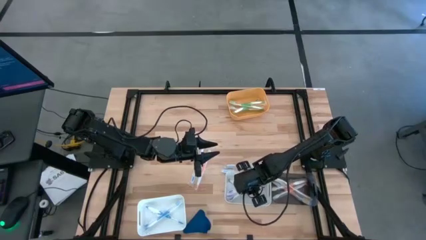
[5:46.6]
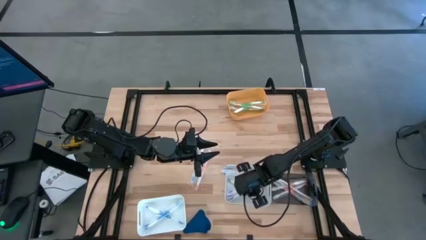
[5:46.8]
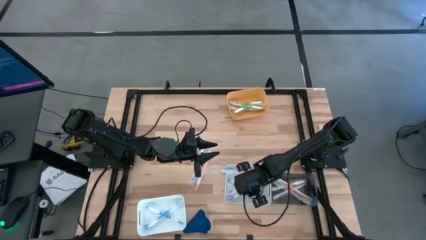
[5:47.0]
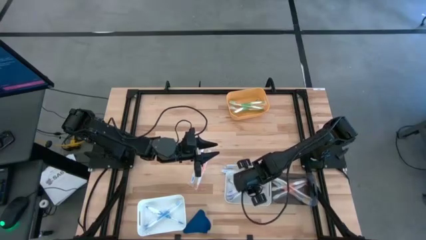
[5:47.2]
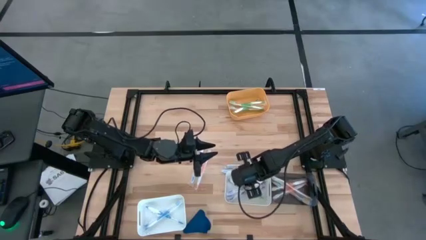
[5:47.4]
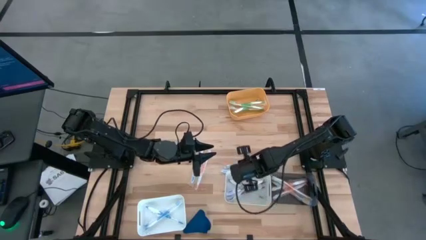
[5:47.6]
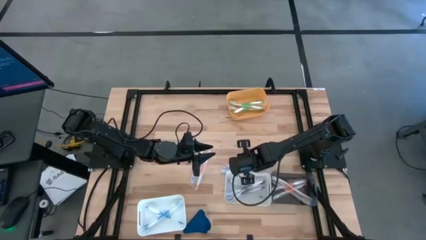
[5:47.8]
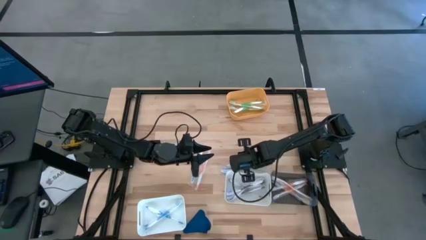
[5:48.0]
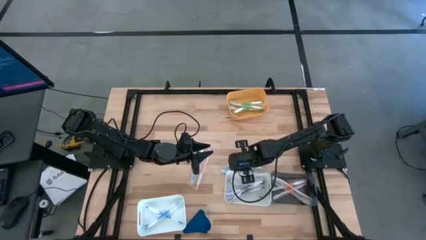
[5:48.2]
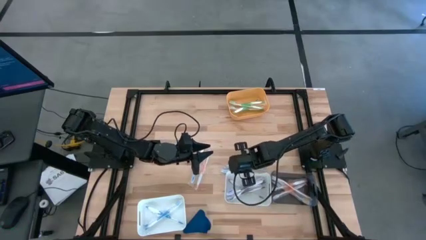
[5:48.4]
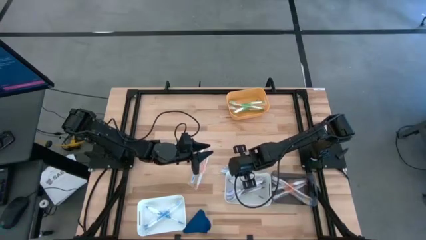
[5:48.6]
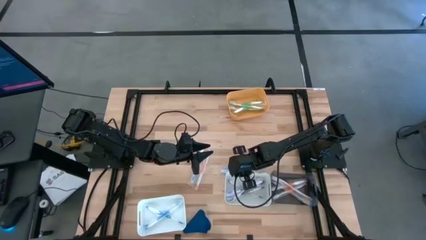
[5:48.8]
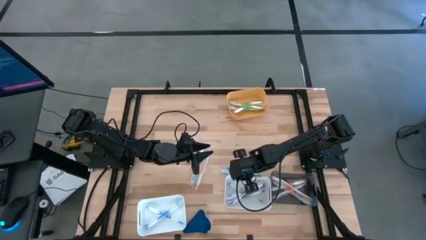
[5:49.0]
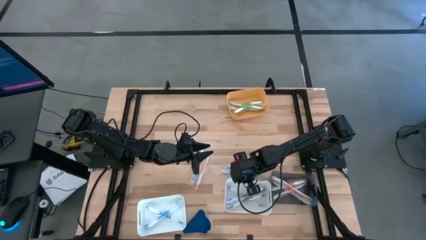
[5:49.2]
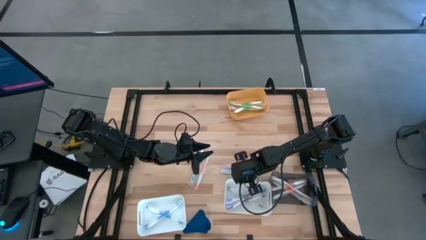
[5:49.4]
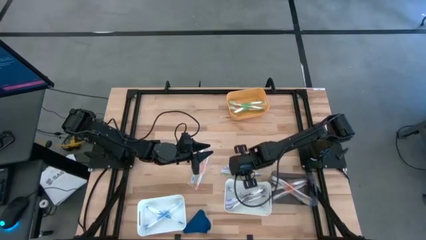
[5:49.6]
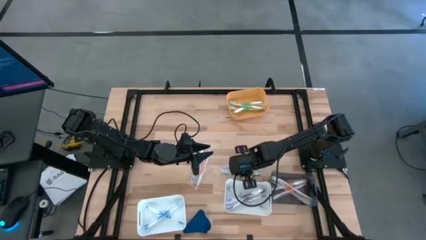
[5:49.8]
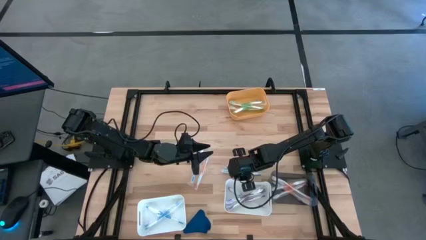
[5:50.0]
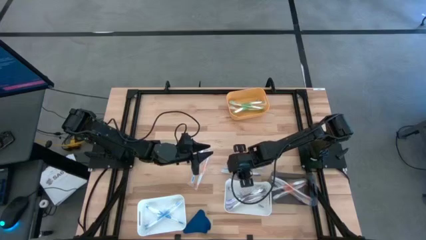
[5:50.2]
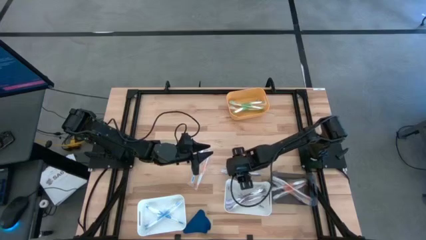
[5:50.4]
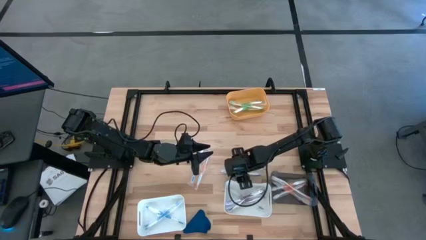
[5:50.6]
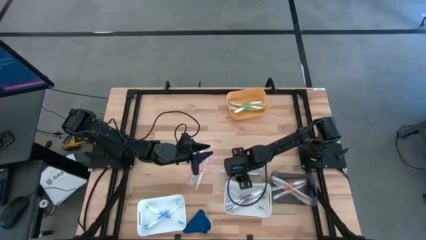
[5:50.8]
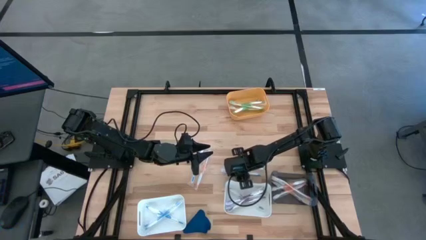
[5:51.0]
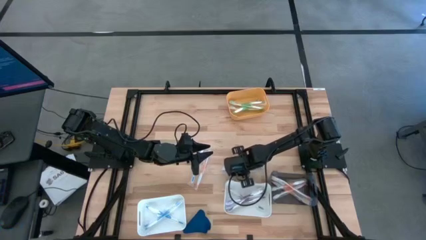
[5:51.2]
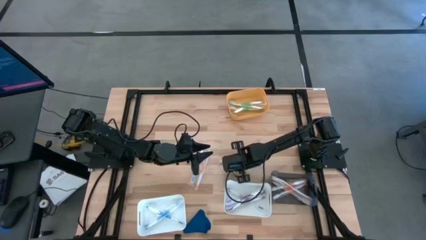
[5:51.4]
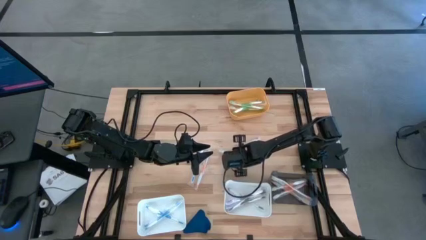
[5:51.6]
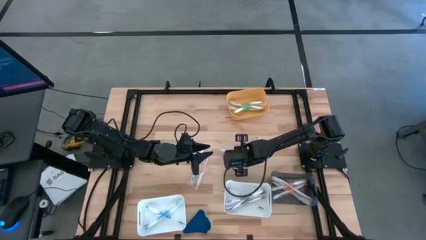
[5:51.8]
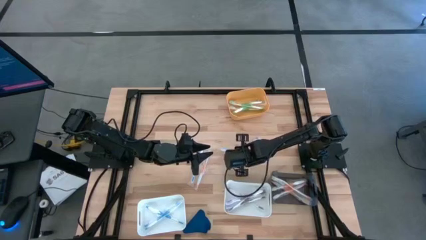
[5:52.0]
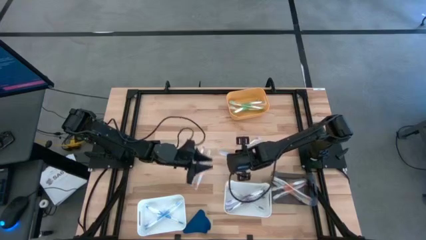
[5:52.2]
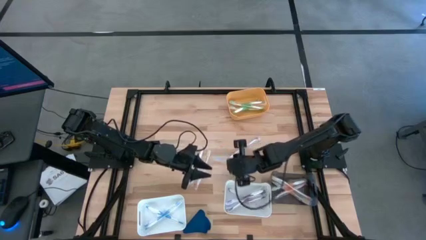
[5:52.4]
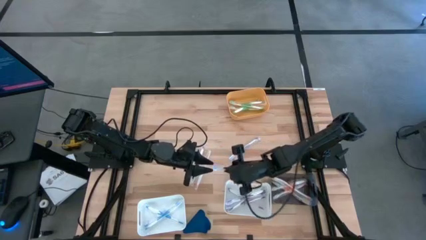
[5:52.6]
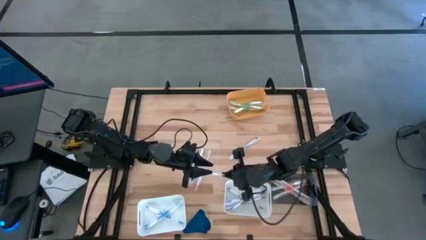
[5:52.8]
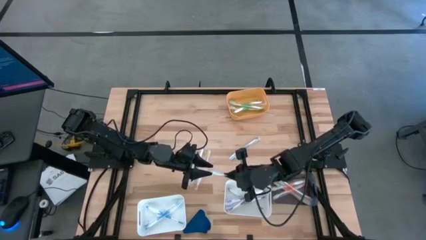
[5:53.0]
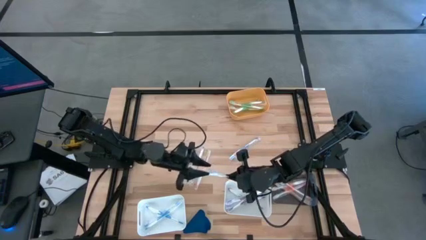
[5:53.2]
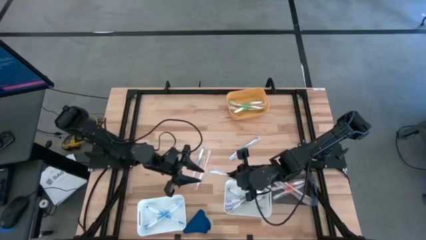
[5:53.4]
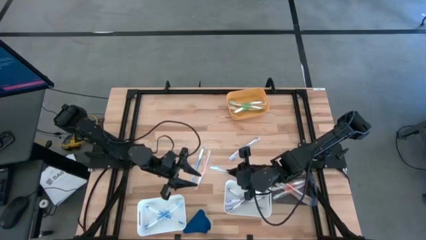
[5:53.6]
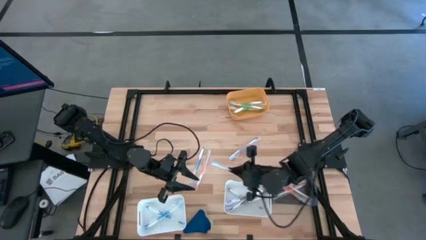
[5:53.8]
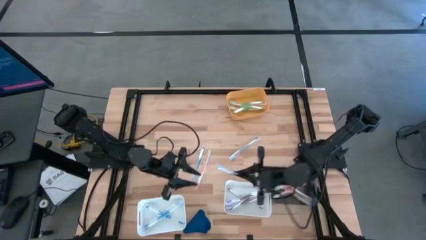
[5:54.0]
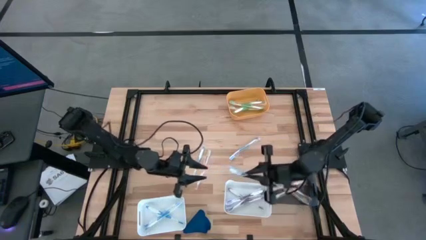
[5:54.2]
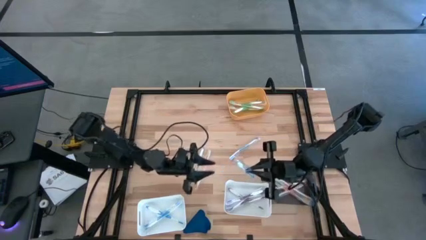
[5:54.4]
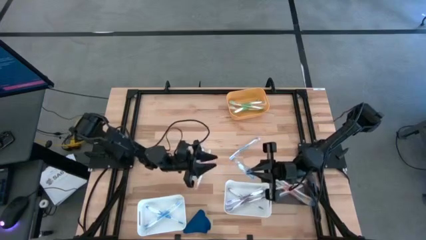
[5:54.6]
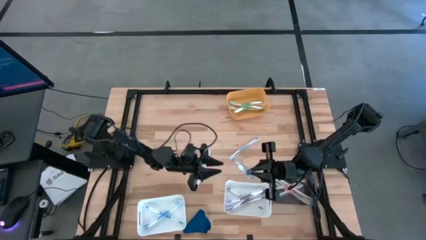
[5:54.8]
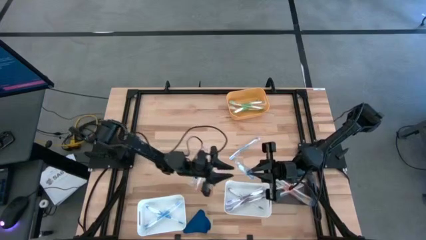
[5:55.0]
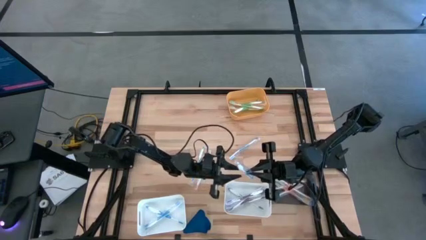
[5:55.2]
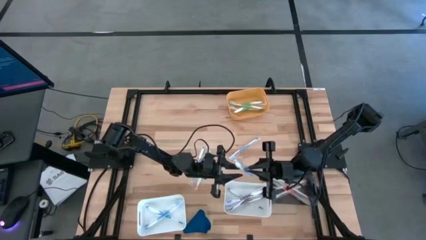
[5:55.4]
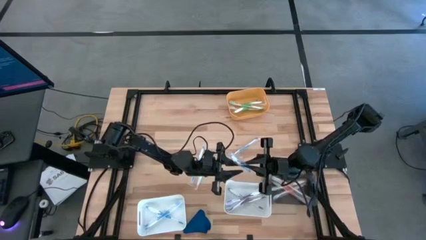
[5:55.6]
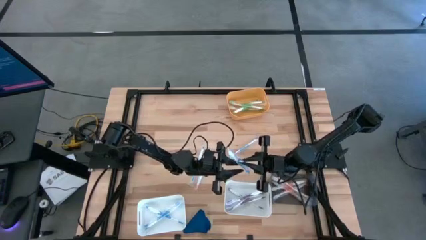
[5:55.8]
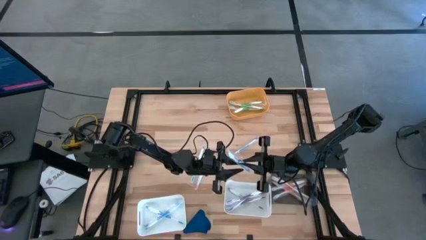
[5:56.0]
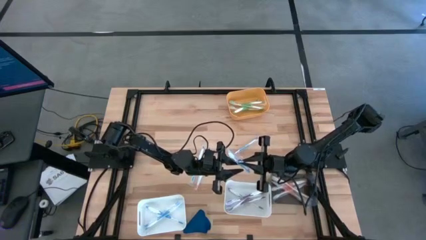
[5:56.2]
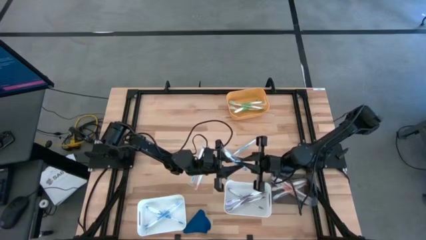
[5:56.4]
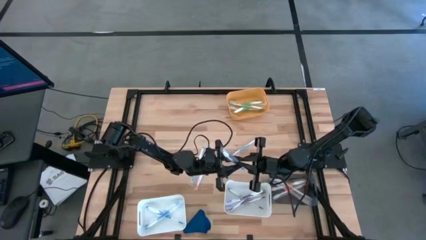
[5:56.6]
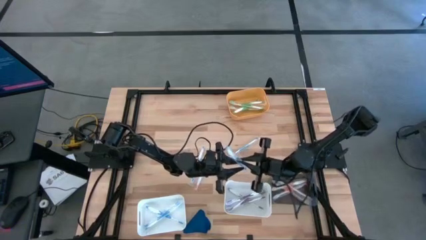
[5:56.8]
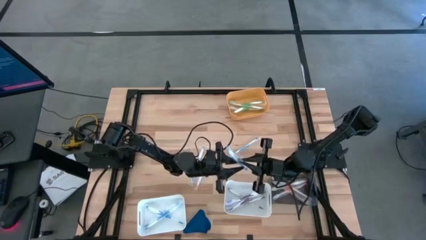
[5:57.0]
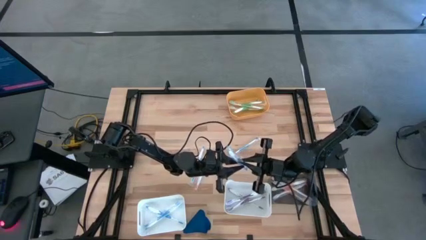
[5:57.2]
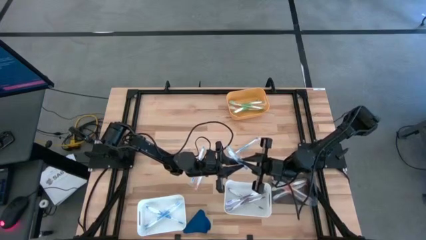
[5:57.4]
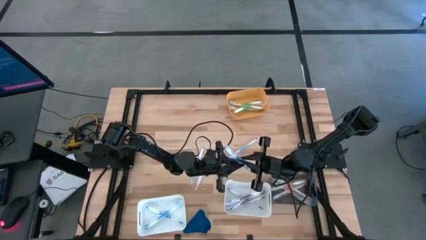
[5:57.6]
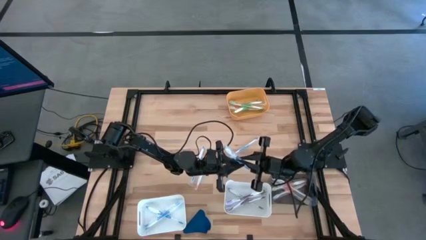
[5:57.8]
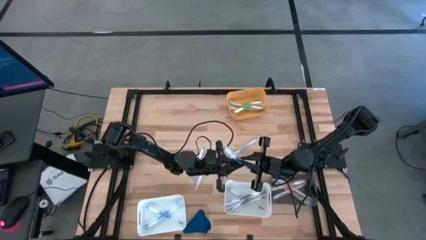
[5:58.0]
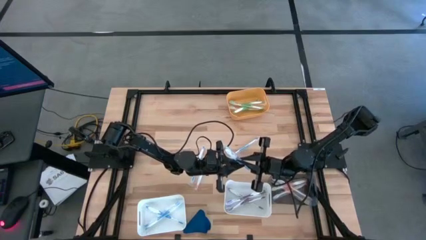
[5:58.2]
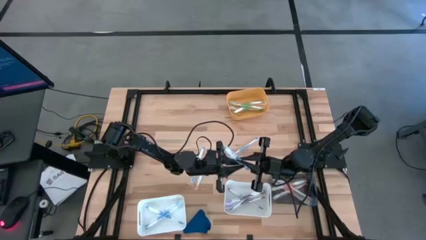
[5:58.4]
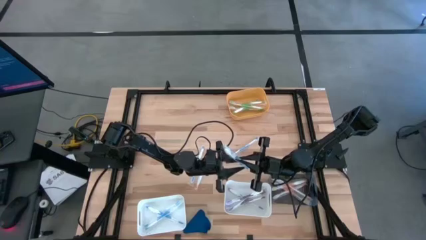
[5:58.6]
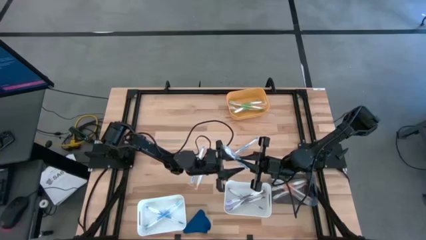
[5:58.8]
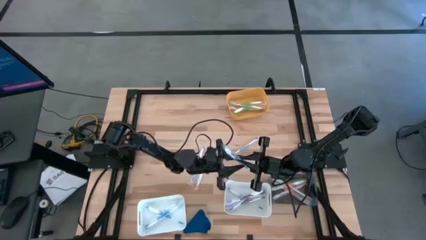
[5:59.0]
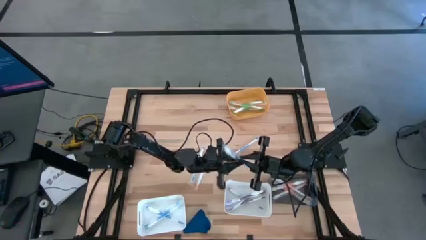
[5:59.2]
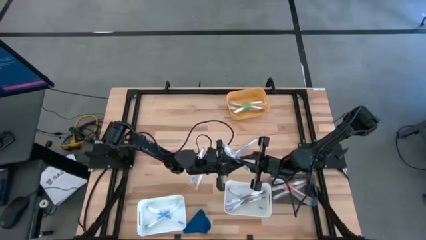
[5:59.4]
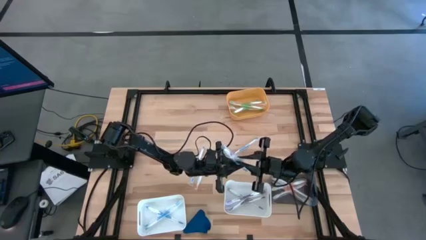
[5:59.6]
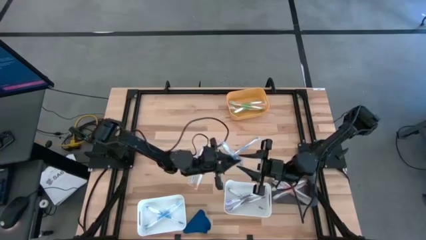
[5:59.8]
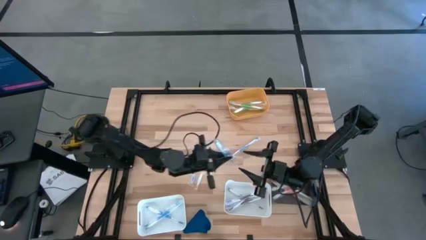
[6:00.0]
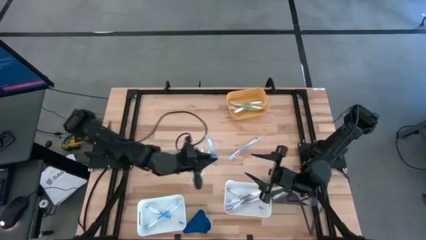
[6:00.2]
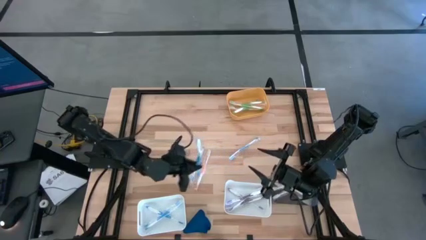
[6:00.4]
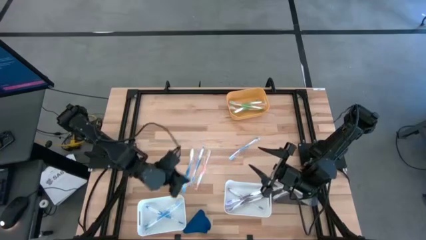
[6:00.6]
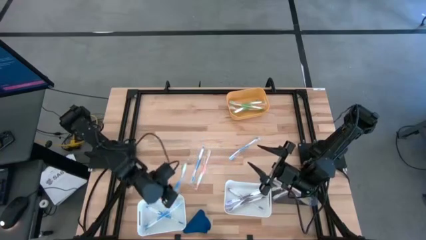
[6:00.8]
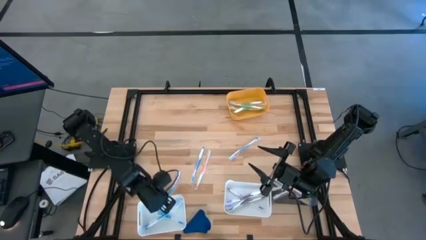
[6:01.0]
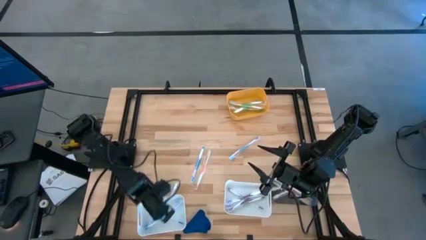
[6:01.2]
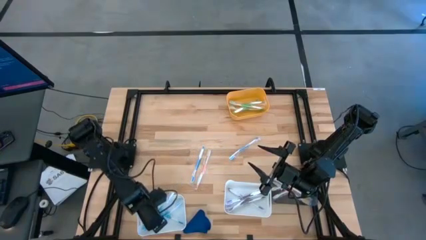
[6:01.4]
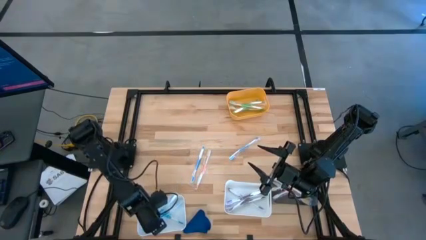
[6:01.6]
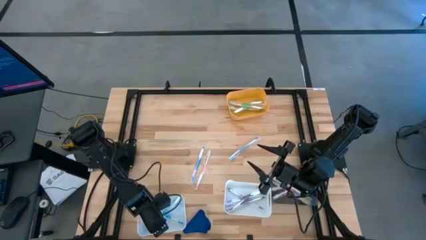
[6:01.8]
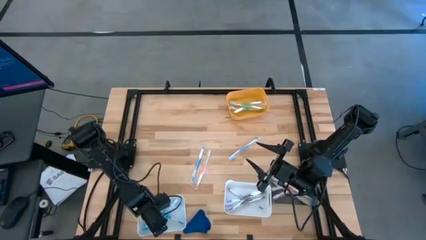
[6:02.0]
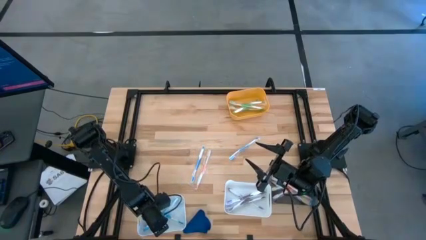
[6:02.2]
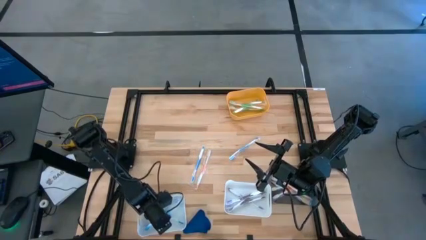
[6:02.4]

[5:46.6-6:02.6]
Task: Pick & Place Toothbrushes
Put the blue toothbrush into the left white bin
